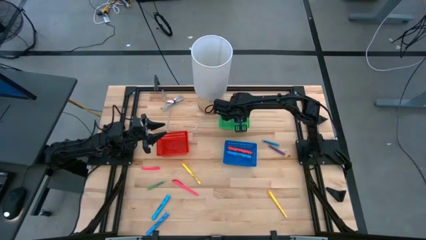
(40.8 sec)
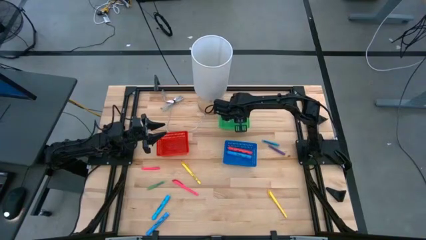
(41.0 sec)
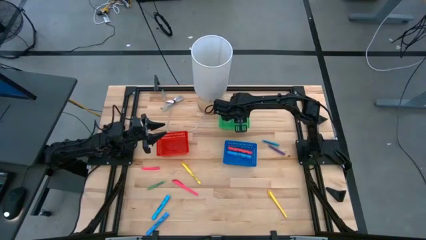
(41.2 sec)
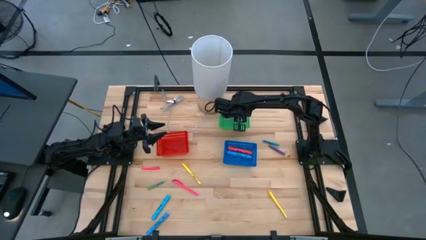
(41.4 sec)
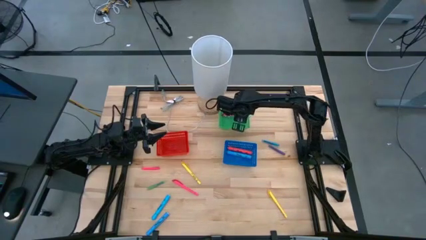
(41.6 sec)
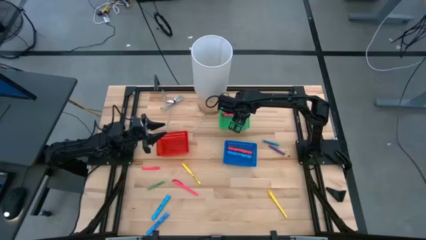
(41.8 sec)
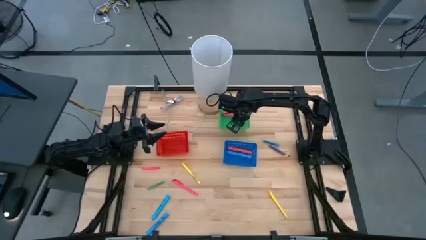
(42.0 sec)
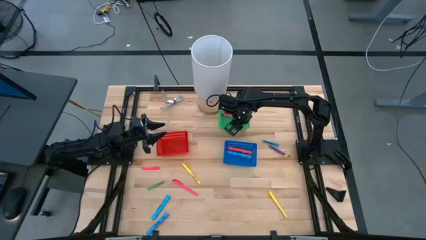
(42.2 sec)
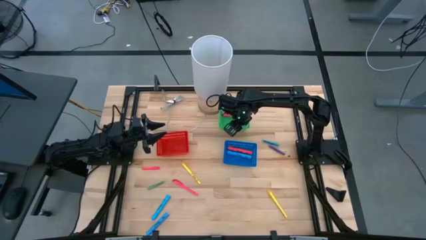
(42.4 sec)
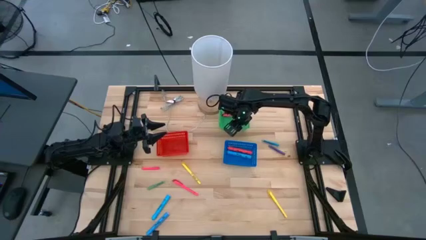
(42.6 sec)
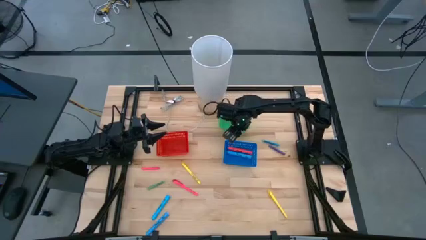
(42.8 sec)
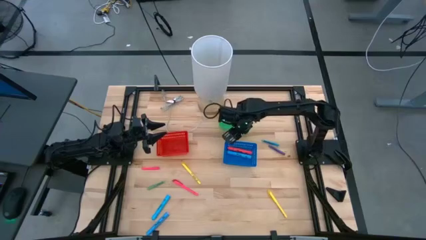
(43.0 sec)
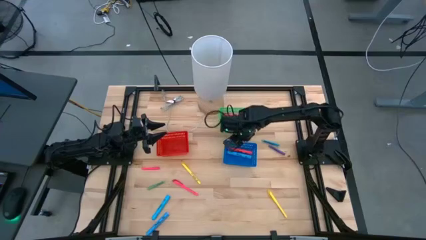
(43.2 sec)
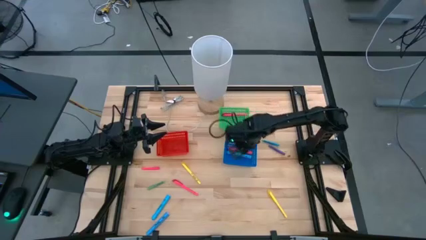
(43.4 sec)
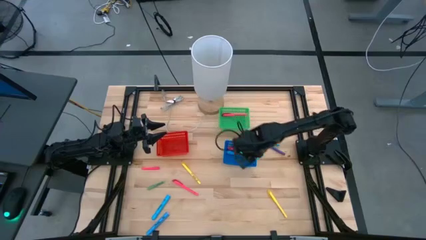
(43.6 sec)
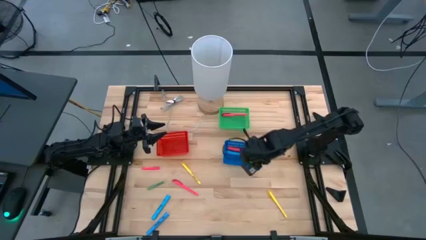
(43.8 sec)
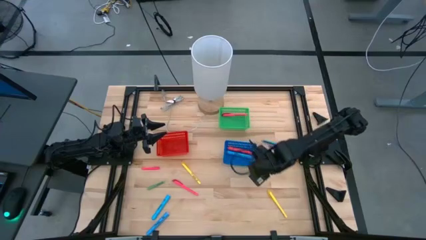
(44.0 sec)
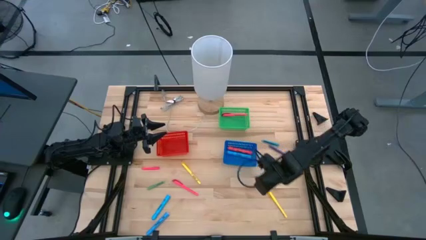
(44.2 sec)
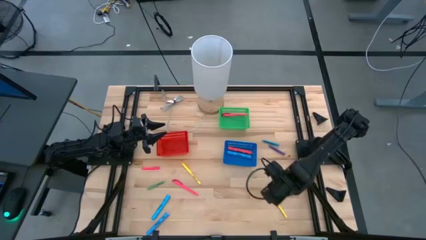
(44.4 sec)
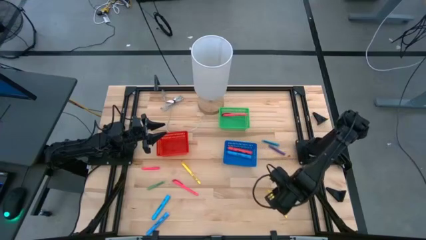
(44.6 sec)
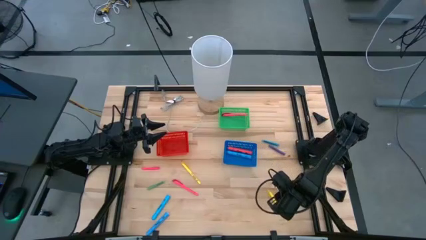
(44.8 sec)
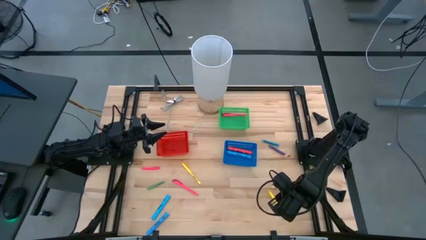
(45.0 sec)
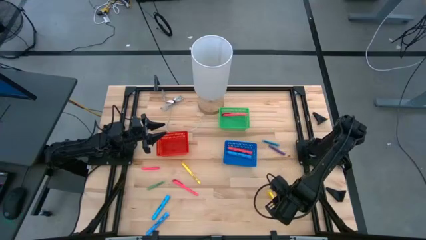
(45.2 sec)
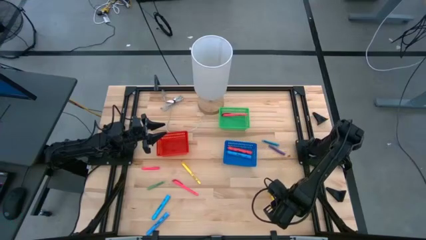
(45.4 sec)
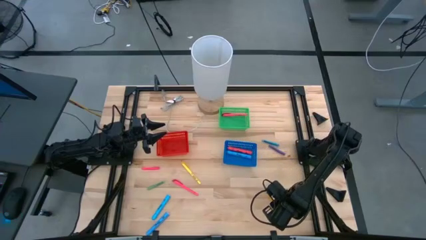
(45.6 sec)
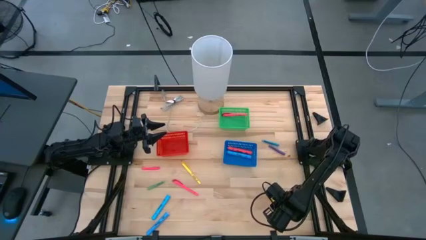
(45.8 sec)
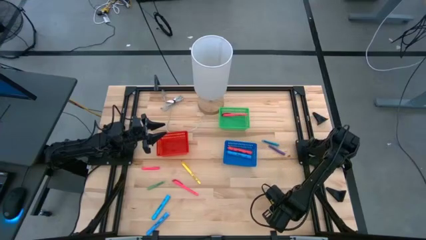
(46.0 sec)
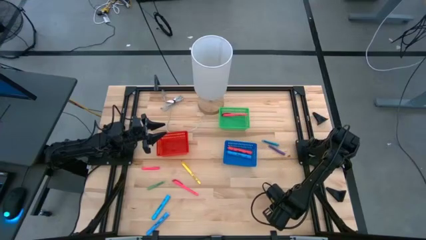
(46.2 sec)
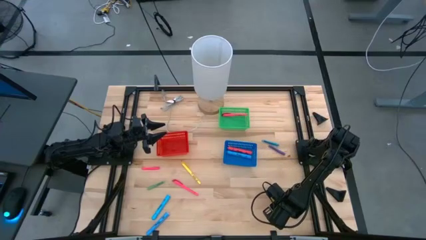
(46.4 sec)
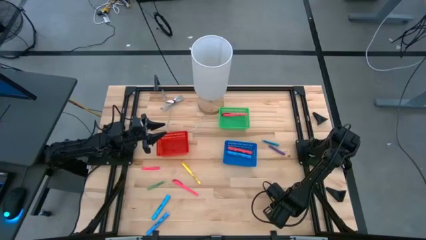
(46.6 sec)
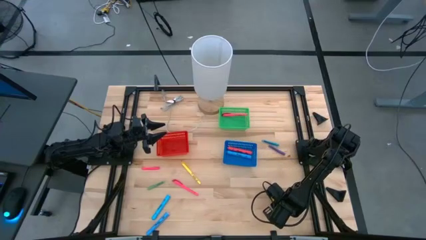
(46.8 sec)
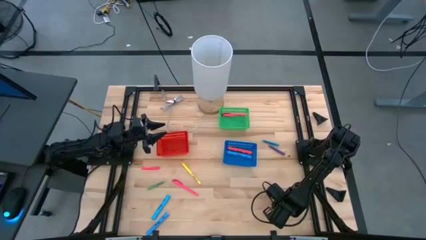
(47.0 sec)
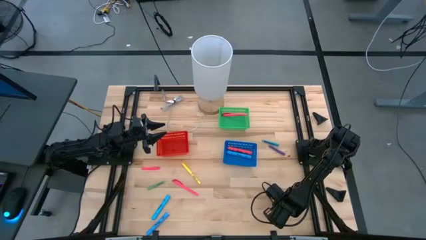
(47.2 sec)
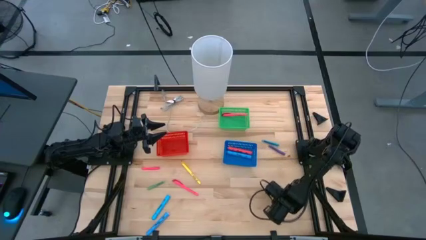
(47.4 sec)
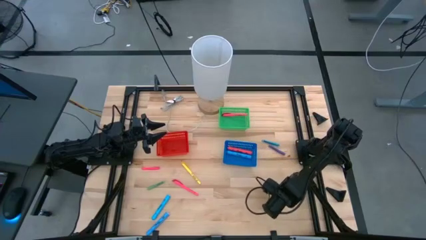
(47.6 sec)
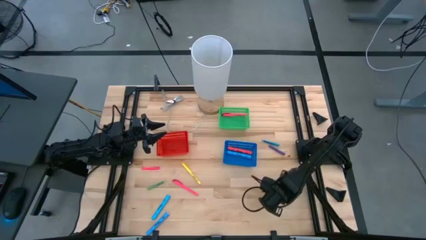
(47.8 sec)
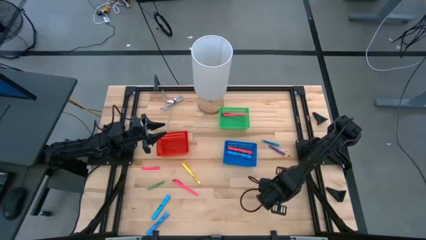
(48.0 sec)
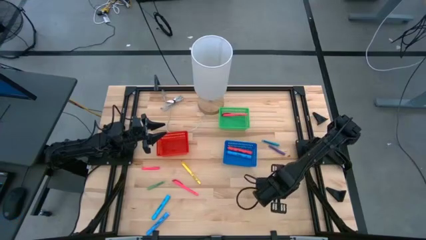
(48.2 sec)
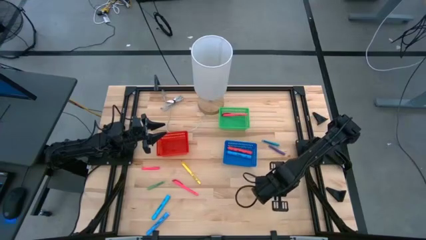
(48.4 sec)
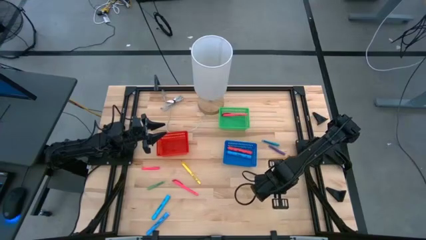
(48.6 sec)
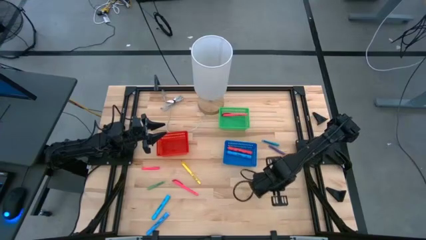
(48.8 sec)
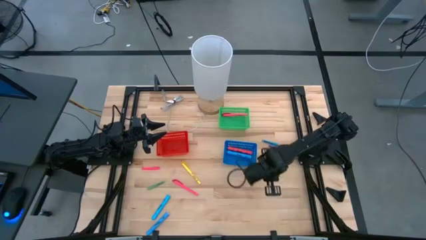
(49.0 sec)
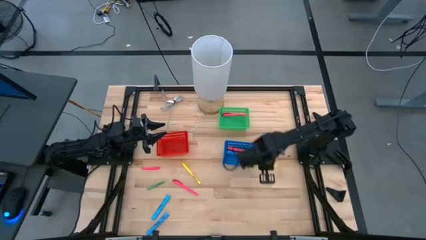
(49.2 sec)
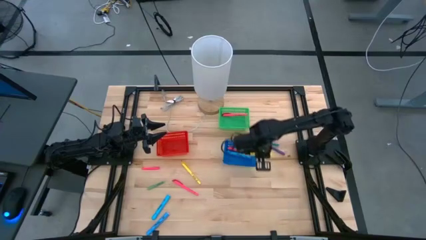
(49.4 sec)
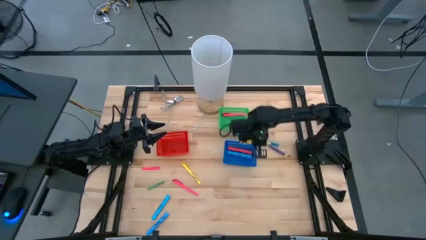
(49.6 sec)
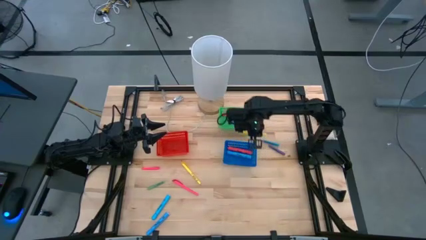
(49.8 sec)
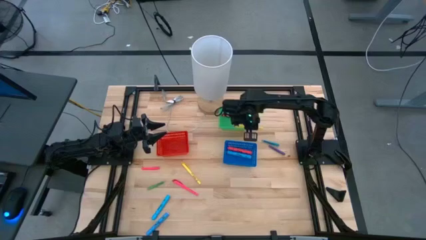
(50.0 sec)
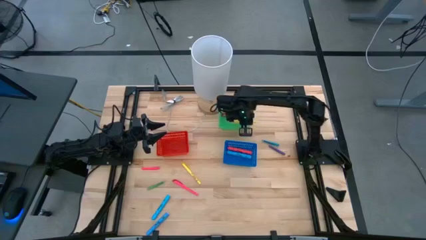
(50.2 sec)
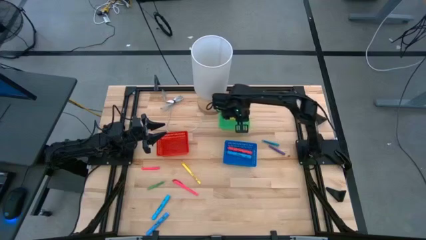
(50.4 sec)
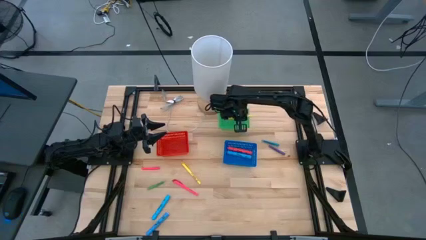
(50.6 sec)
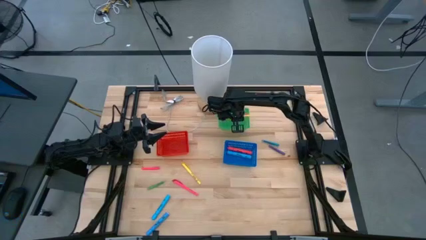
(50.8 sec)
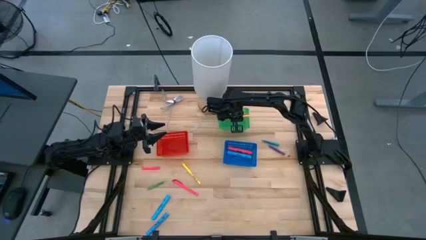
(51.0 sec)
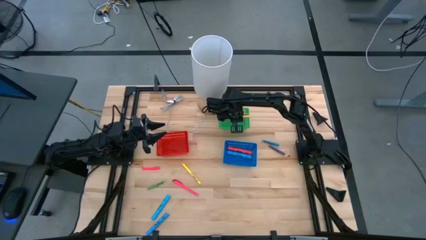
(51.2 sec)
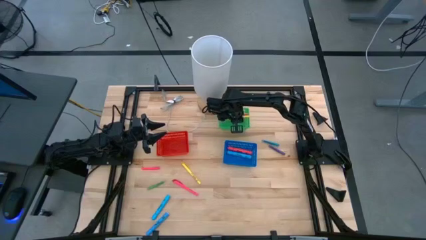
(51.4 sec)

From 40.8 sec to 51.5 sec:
Task: Pick & Place Markers
Put the bottom large yellow pen into the green bin

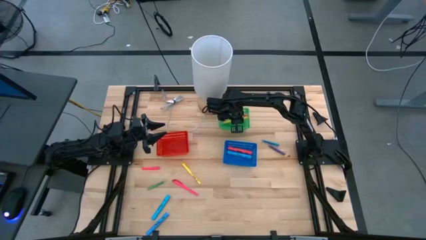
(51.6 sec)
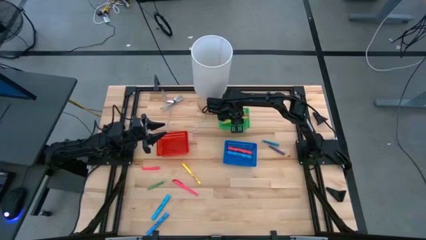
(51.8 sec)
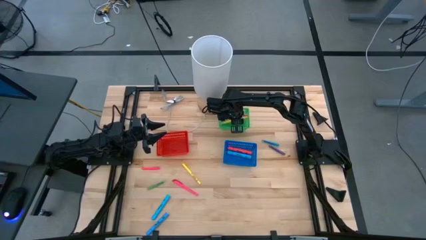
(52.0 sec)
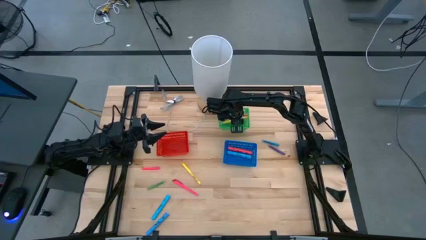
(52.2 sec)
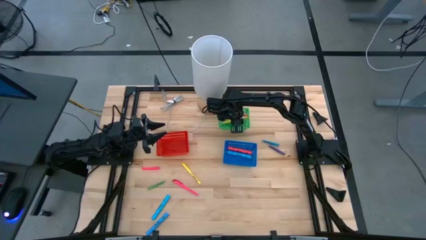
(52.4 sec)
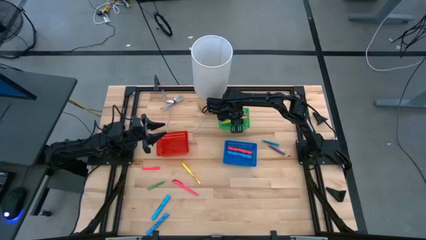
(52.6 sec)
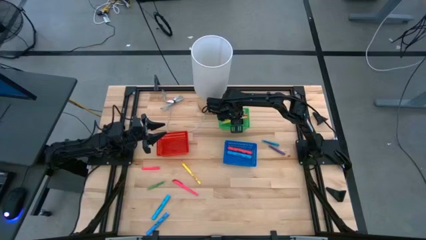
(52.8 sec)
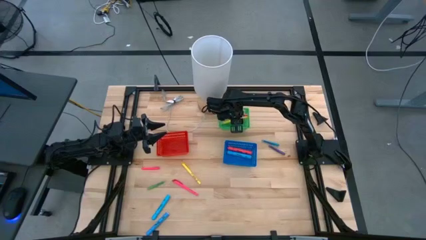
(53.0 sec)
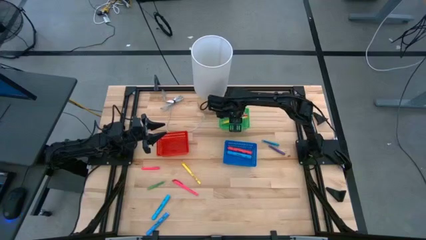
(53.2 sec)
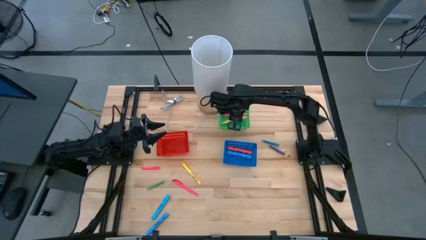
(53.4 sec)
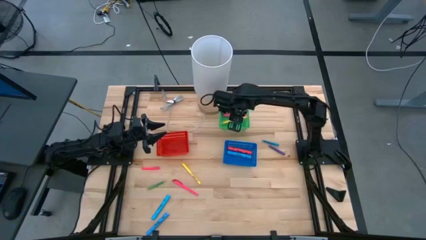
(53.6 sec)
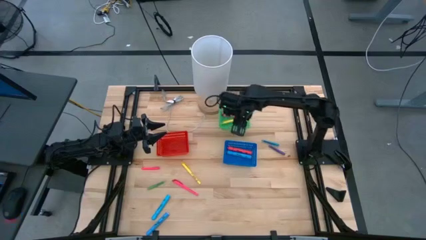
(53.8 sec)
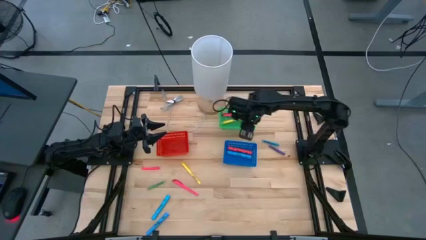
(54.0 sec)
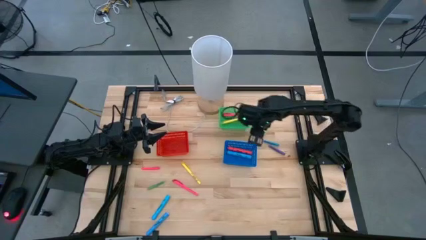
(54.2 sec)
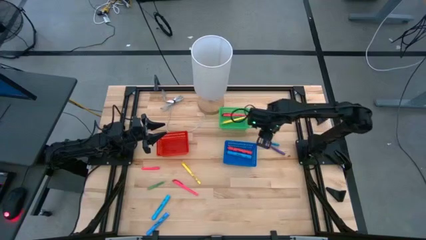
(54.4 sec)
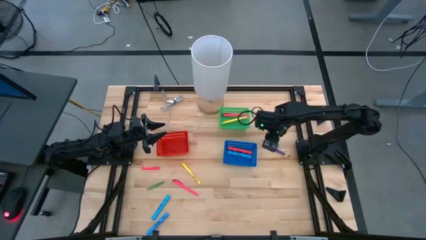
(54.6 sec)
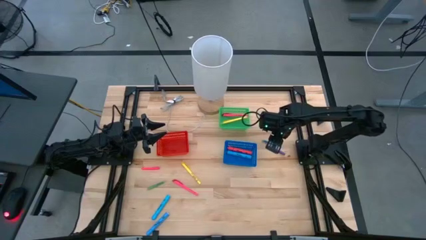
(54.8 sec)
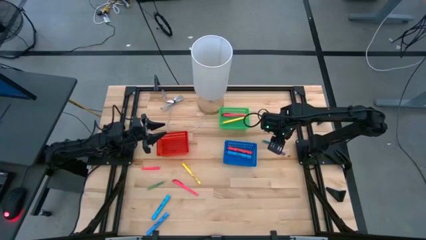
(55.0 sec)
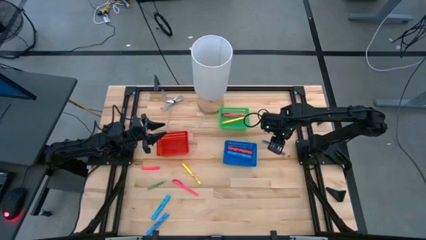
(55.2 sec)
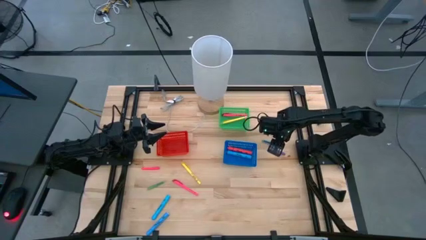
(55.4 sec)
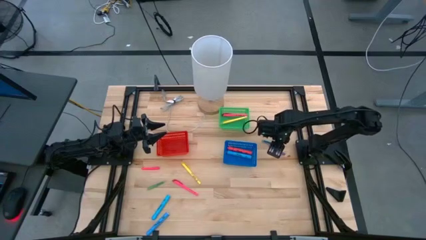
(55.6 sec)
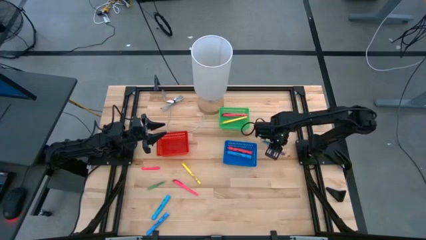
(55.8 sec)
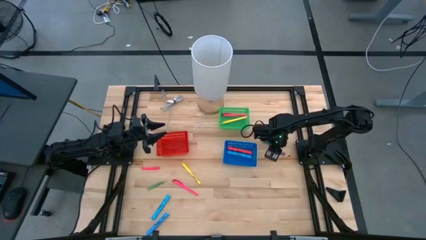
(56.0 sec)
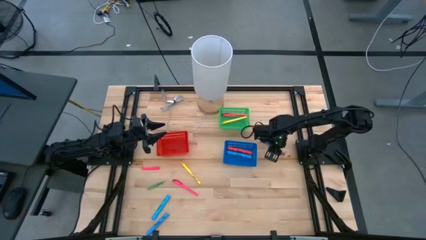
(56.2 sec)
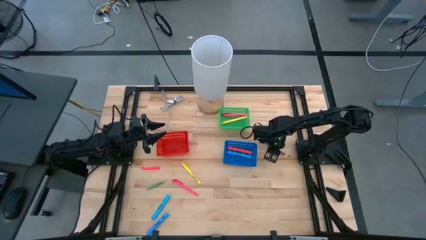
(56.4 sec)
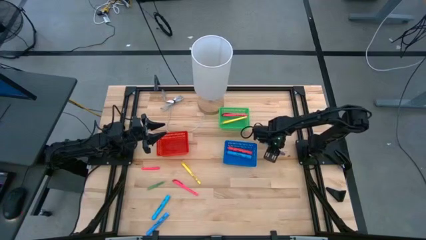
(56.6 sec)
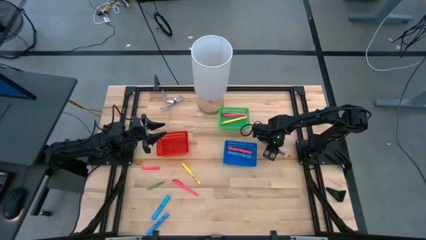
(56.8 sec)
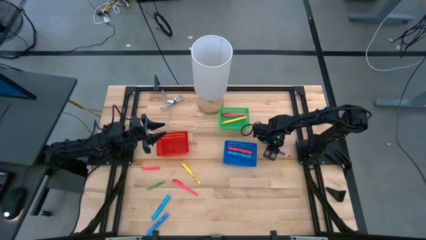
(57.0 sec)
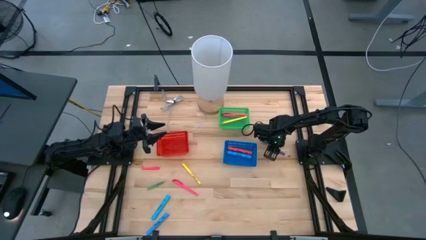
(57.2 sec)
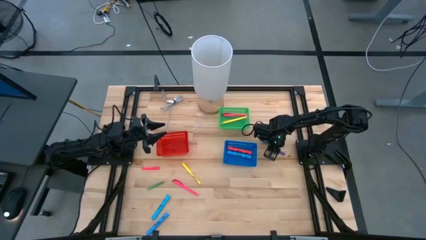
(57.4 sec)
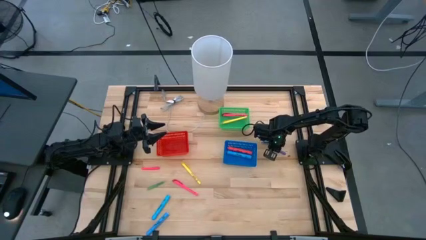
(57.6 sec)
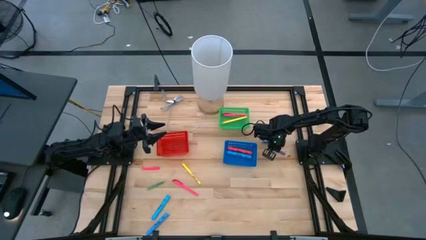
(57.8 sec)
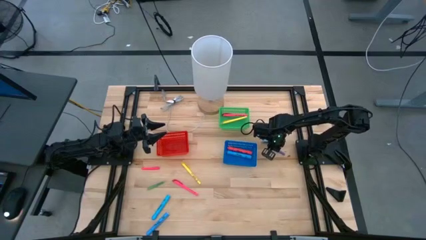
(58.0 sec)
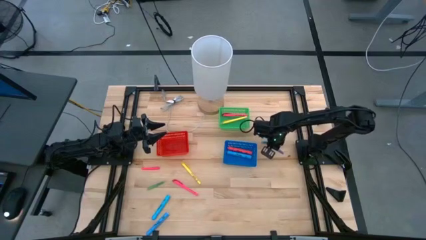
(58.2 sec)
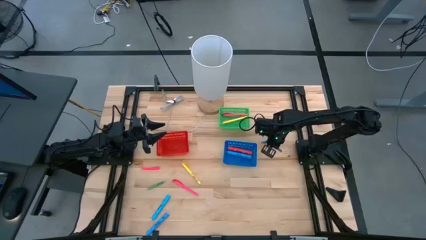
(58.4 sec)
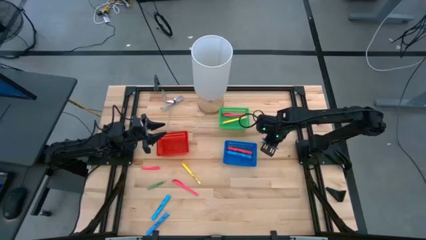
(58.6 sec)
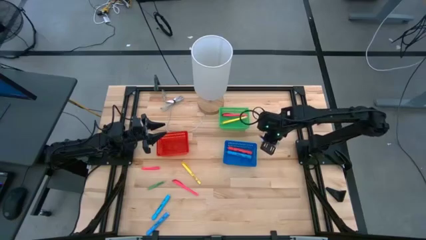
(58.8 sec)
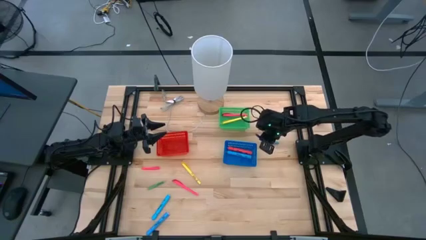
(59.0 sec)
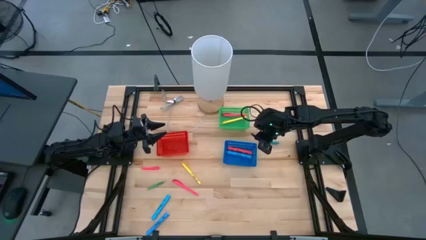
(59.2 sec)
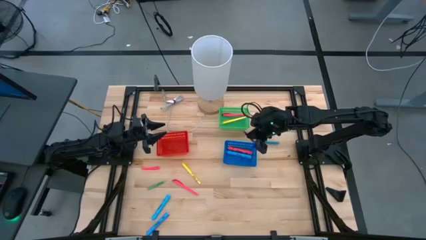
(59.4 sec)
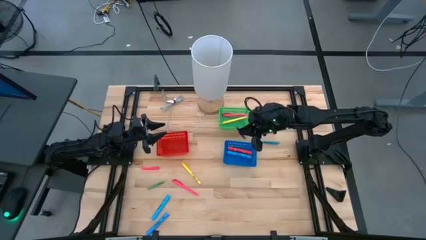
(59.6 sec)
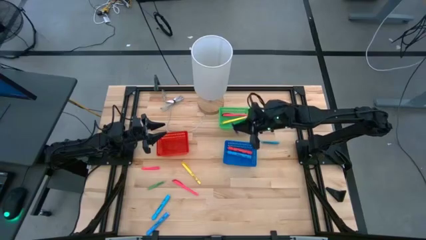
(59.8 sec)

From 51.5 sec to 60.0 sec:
Put the small purple pen into the red bin
